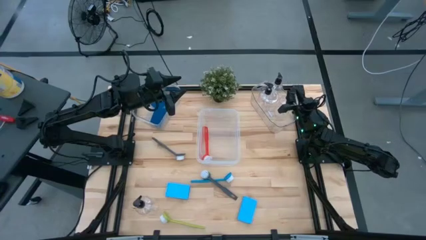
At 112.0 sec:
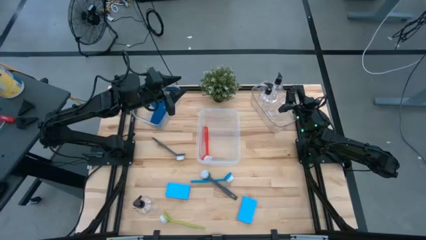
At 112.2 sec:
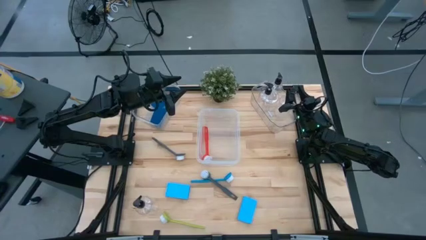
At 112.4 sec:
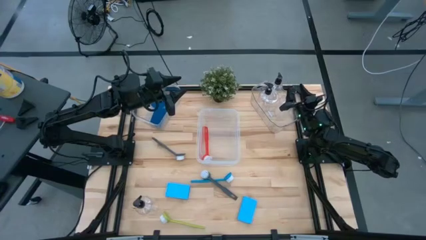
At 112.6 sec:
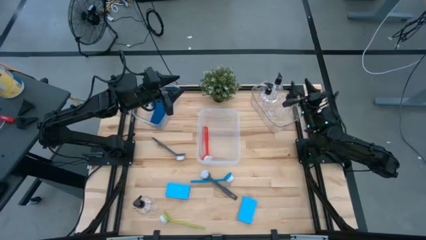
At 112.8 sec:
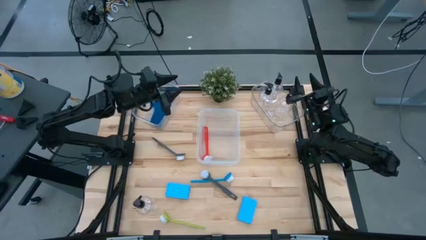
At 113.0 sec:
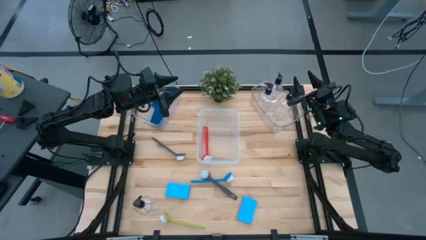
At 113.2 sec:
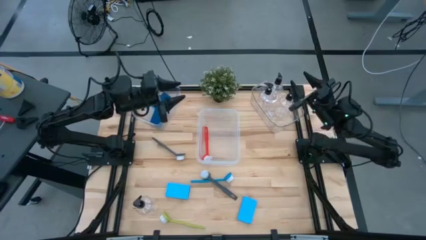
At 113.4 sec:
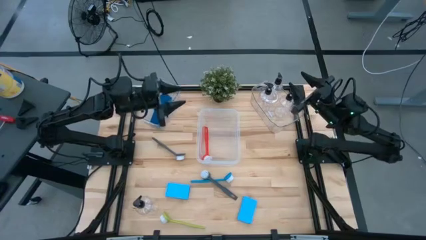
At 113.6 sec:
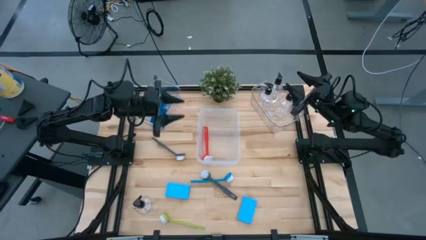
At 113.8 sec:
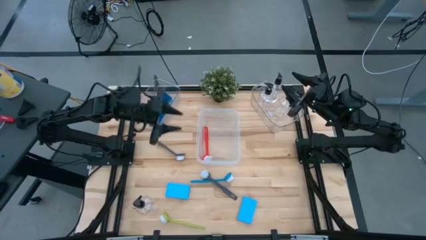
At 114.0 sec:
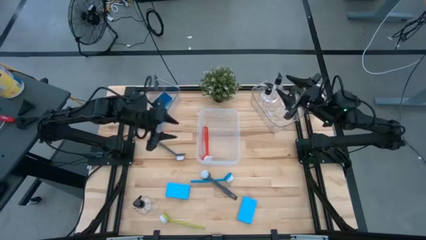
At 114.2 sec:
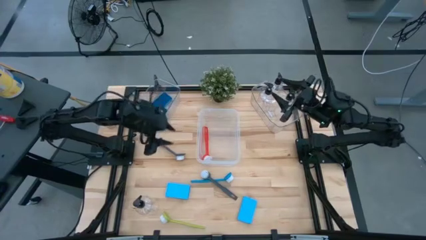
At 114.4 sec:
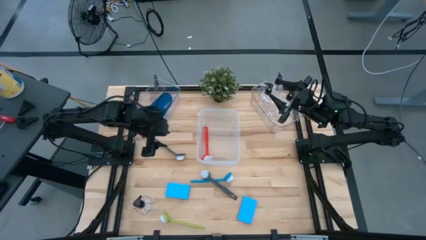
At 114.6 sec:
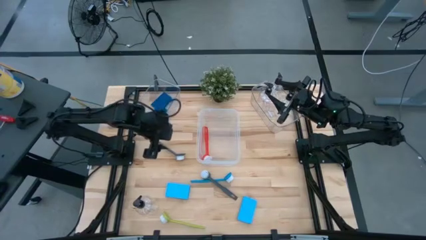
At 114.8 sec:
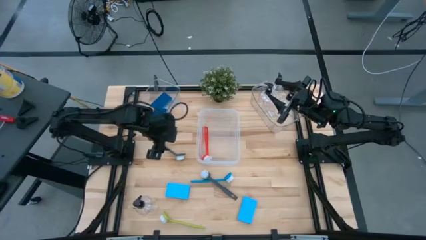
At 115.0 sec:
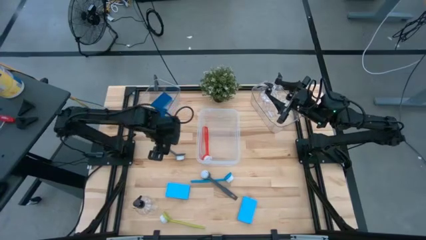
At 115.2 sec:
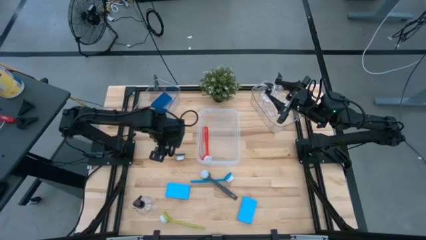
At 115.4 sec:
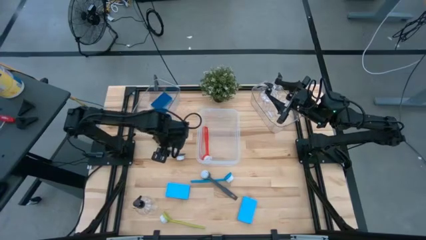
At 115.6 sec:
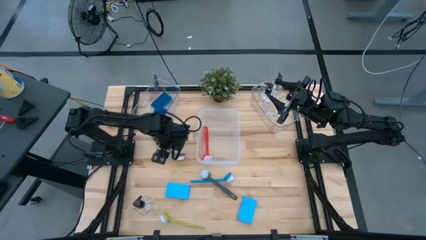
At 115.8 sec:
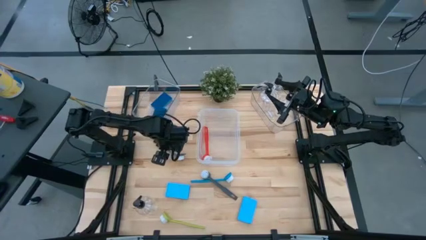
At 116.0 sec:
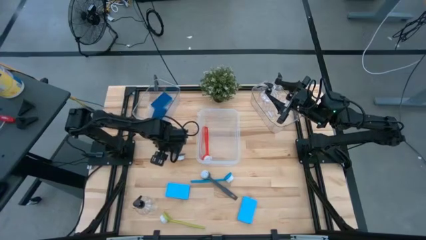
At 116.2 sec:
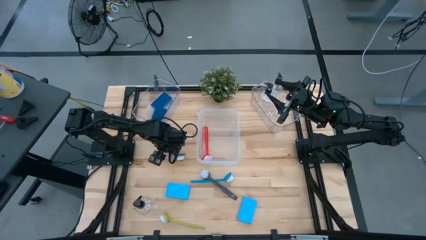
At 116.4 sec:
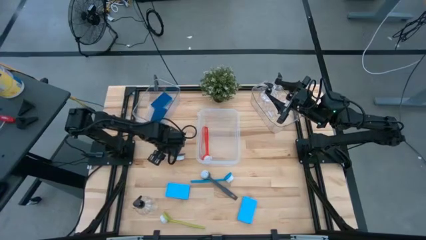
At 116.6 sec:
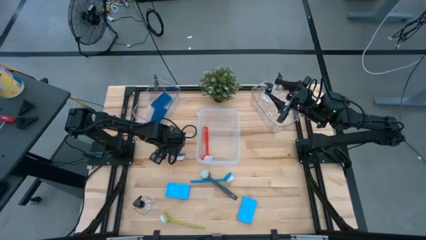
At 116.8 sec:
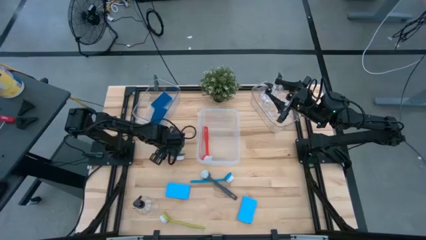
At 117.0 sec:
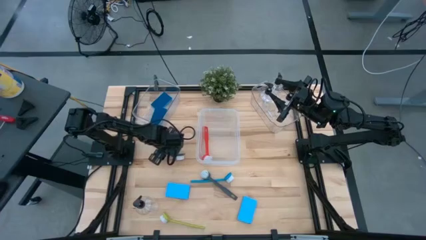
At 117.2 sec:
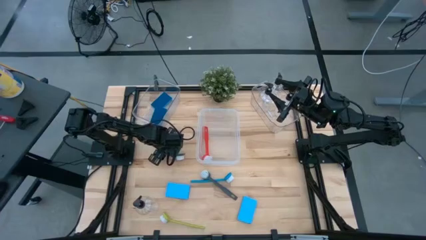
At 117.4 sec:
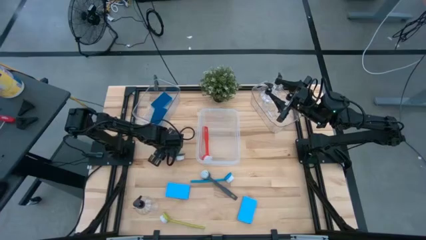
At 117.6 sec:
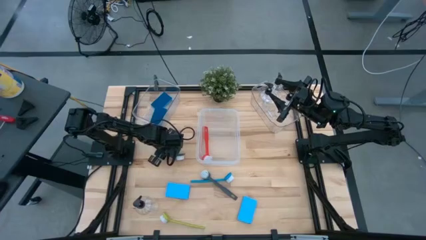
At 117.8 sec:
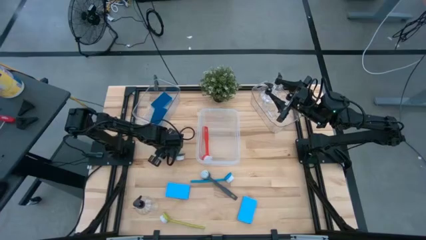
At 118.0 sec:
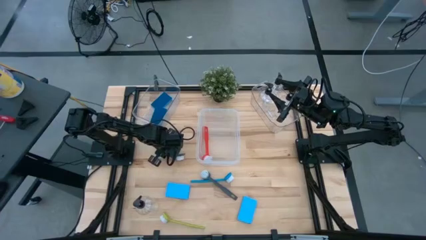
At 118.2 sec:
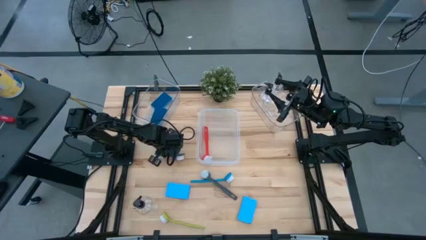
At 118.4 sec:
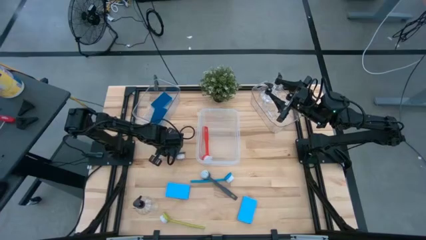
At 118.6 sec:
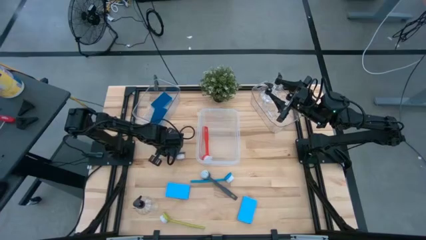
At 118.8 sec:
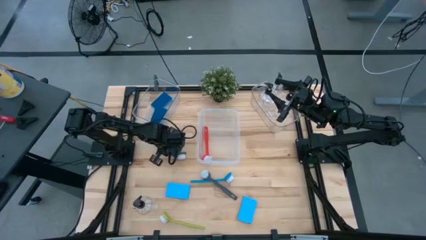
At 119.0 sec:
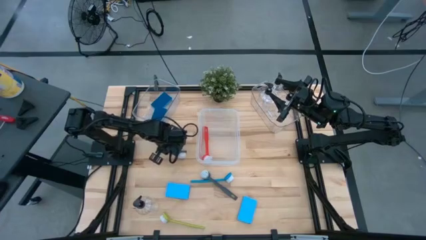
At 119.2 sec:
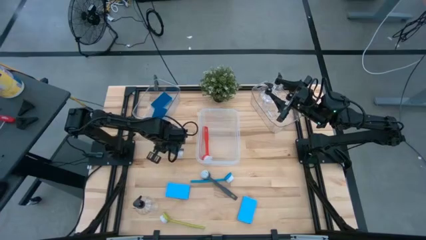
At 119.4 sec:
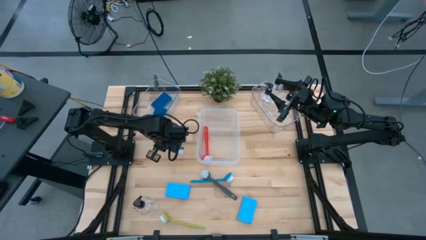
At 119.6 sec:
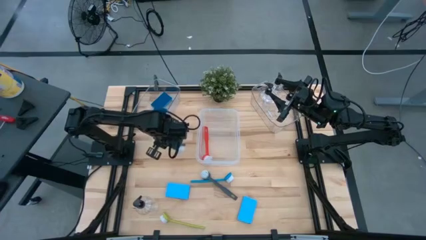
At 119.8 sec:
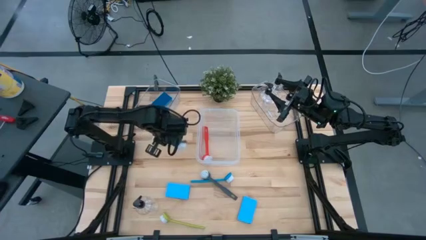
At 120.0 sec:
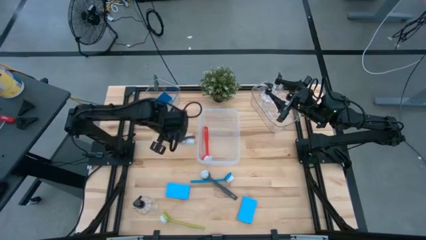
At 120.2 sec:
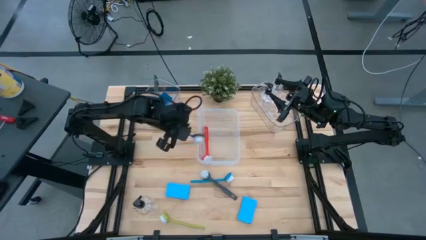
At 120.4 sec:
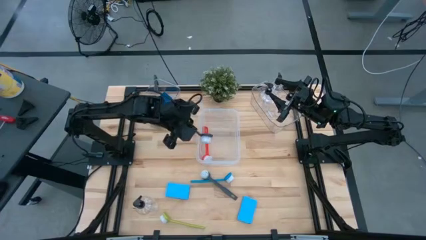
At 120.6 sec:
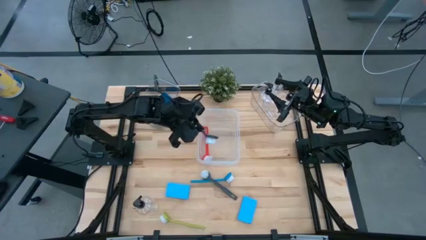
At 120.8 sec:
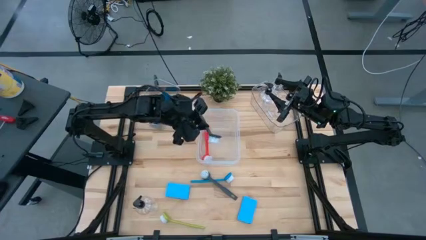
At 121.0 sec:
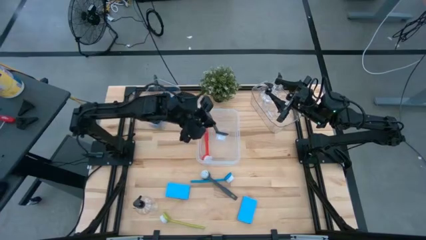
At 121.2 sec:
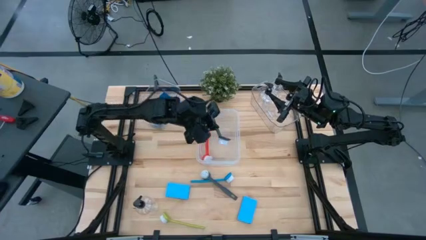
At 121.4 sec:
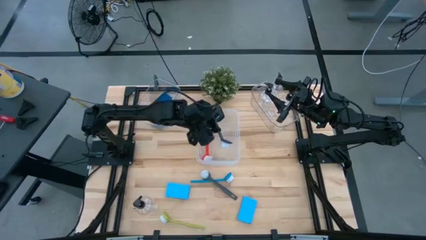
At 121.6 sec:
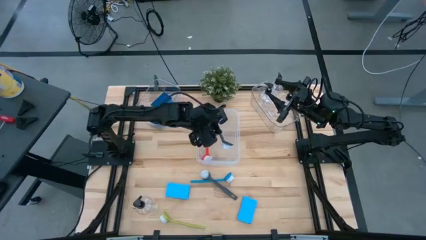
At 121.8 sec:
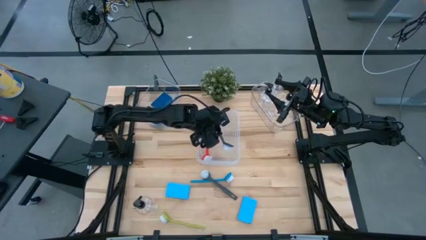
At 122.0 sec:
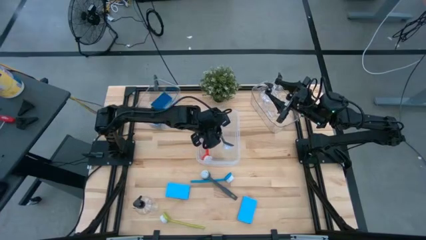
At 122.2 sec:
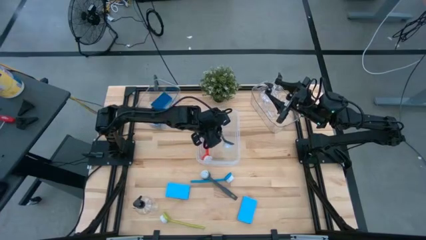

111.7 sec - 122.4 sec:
Task: Pick & Place Kitchen Sink Supplies
Put the gray dish brush into the transparent container
